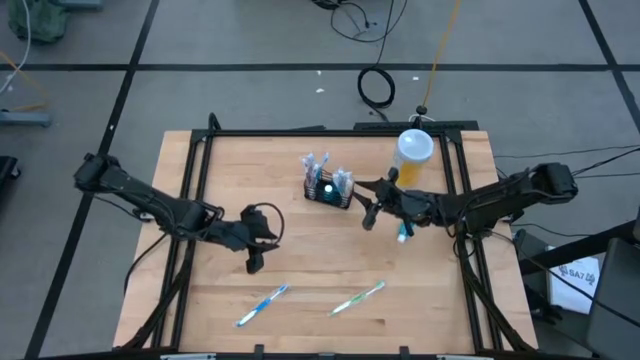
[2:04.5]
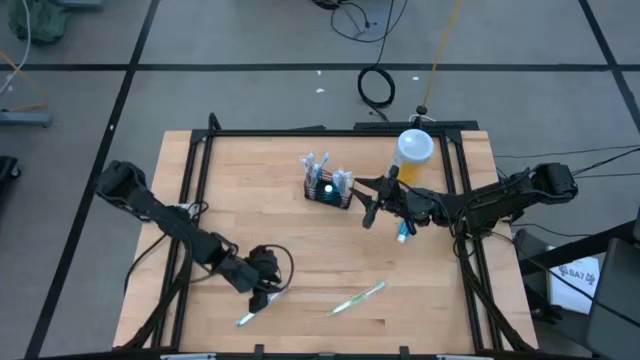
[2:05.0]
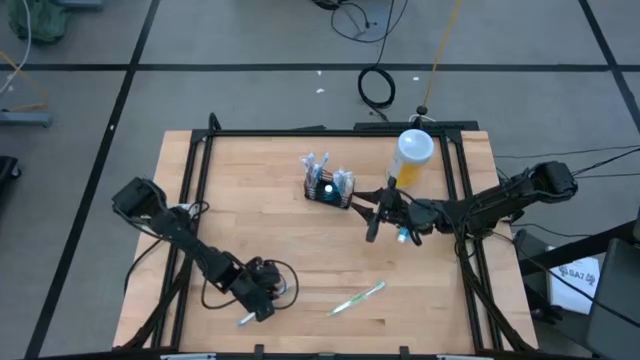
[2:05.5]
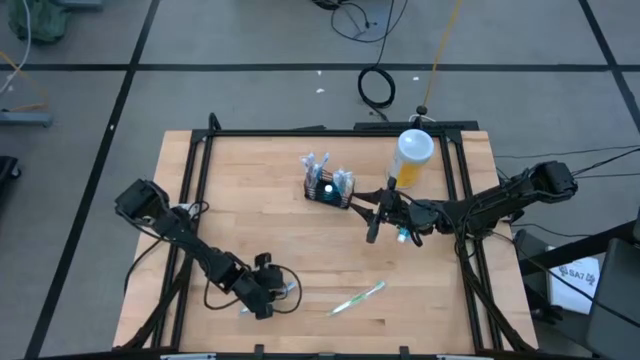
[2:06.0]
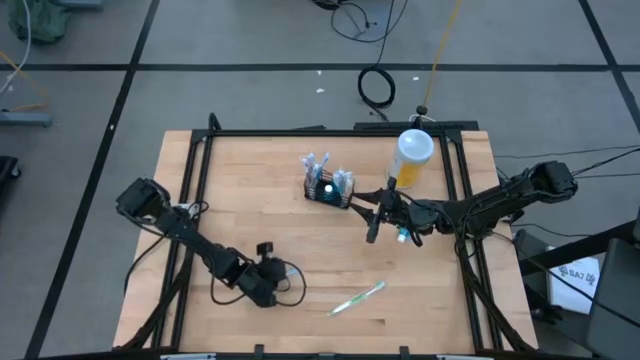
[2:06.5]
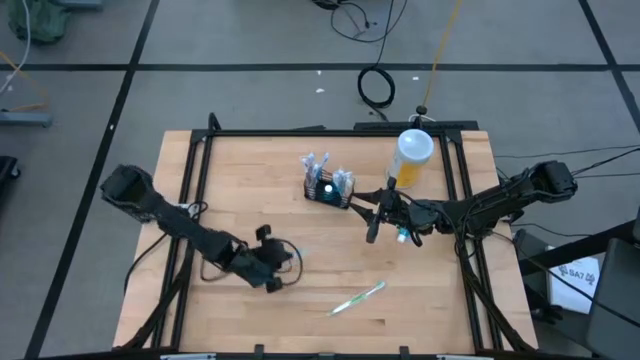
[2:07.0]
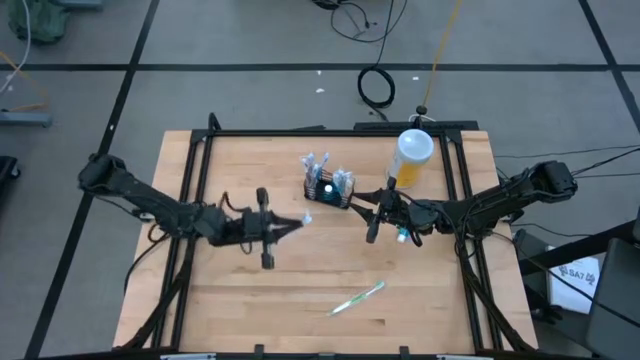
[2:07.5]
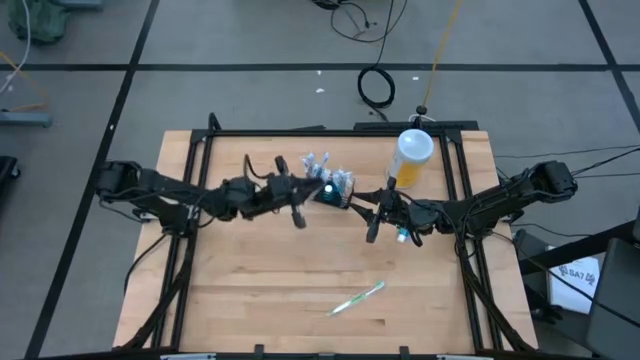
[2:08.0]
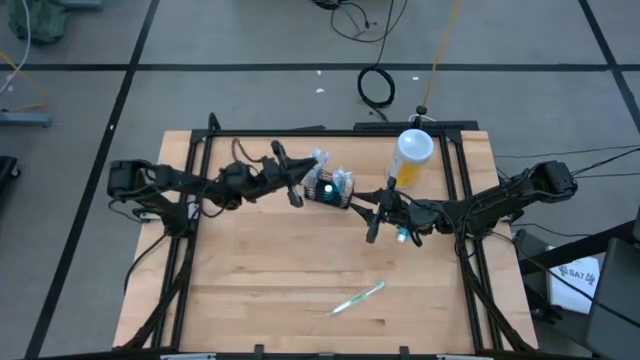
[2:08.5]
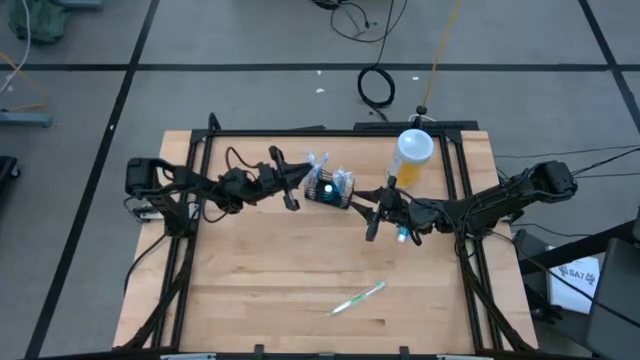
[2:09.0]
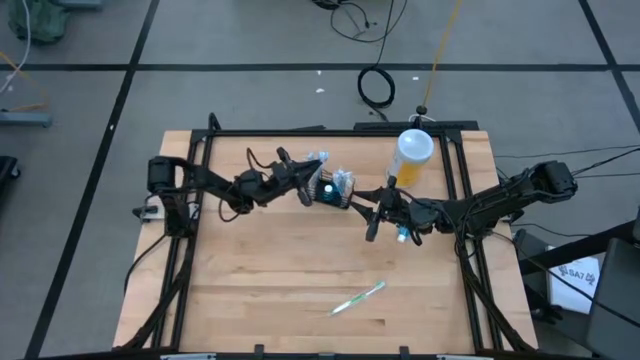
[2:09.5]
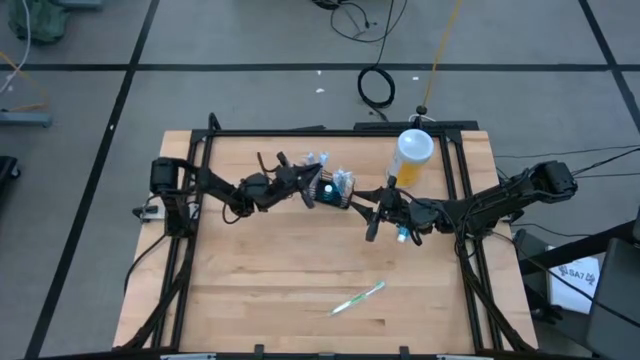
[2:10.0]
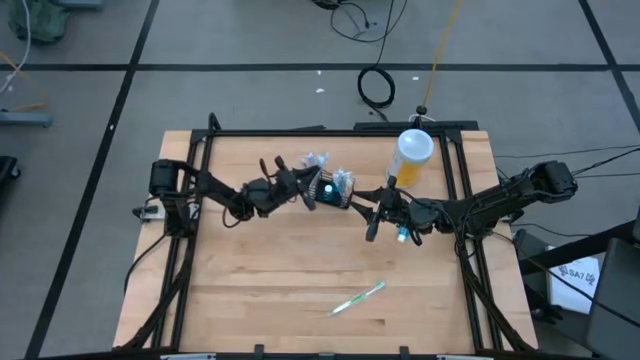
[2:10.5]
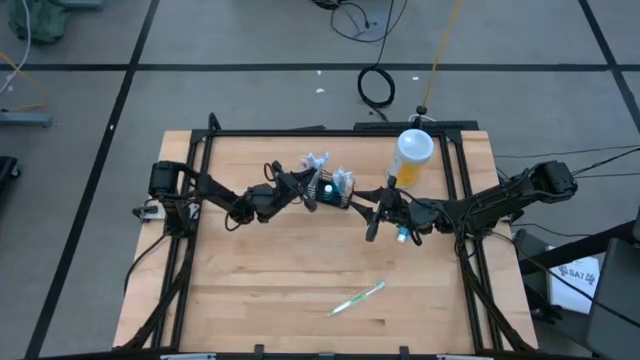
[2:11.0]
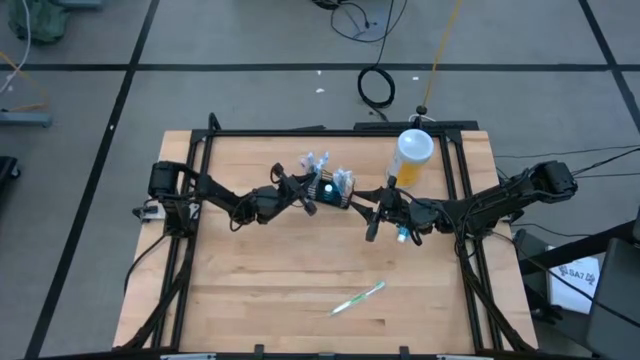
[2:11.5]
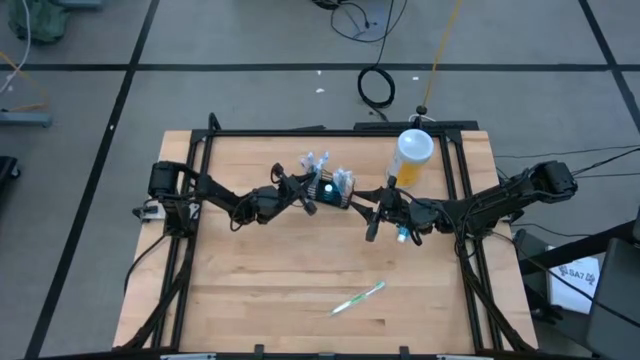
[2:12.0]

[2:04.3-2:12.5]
Task: Pick & Place toothbrushing station
Put the blue toothbrush into the black wire organizer

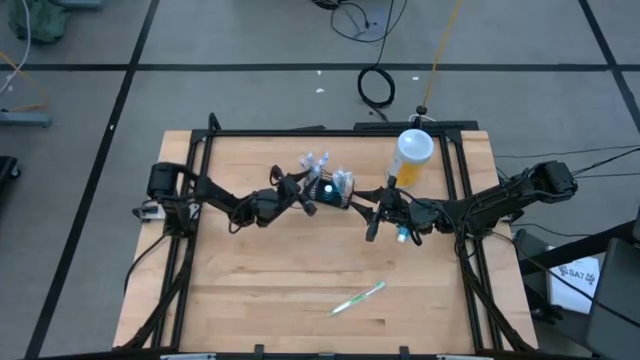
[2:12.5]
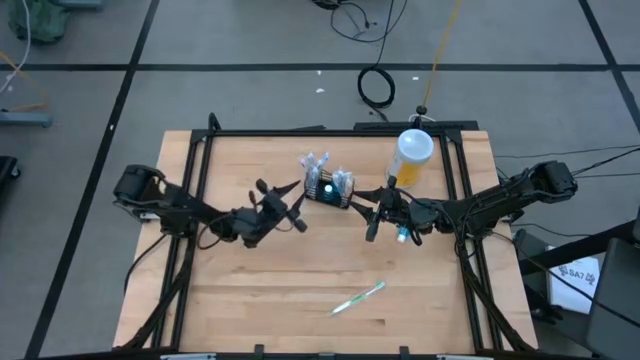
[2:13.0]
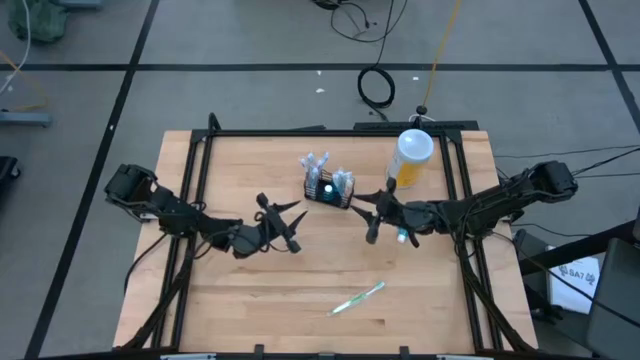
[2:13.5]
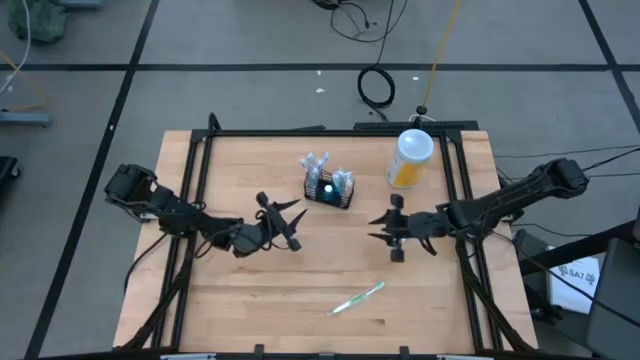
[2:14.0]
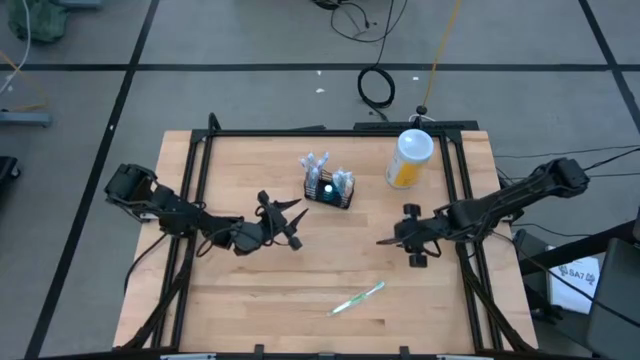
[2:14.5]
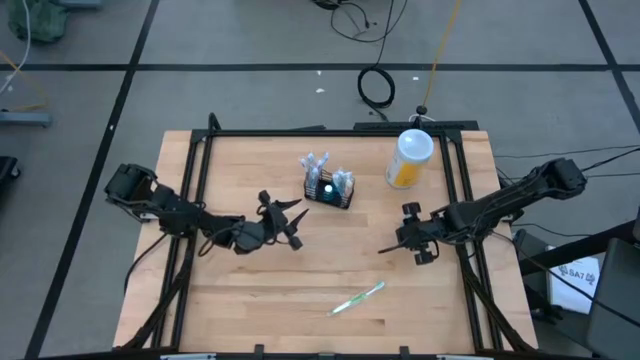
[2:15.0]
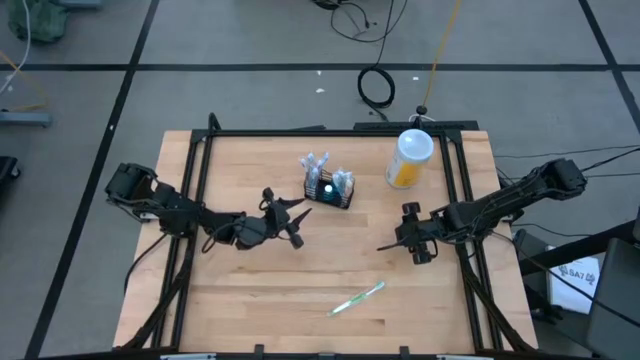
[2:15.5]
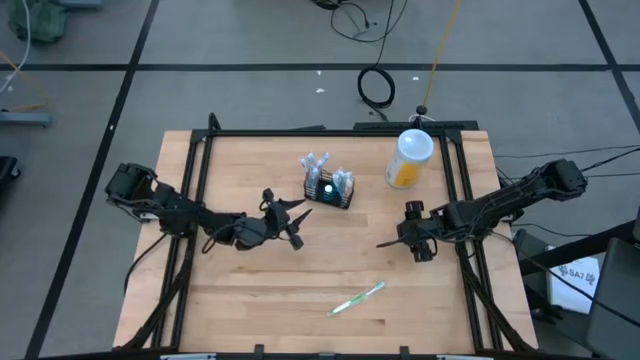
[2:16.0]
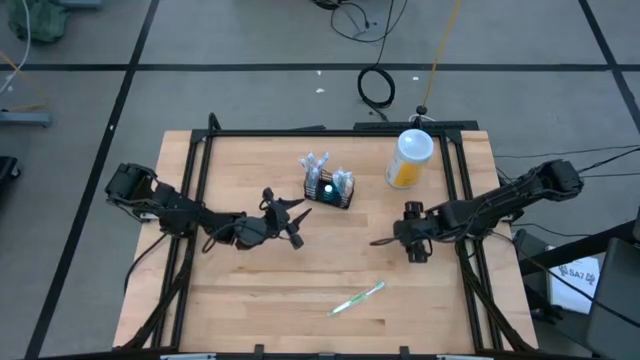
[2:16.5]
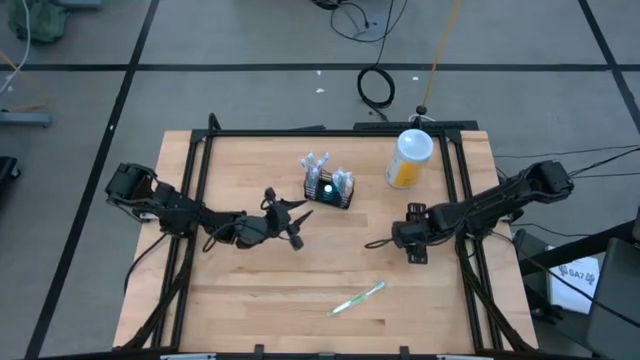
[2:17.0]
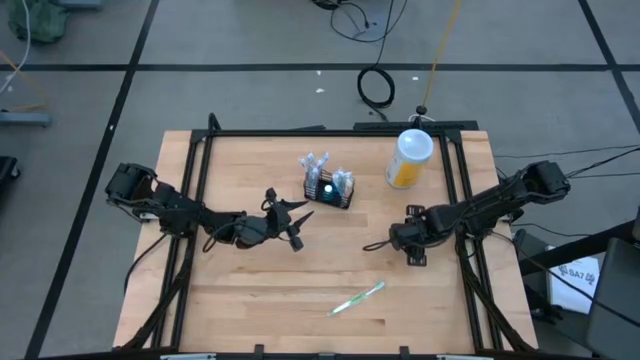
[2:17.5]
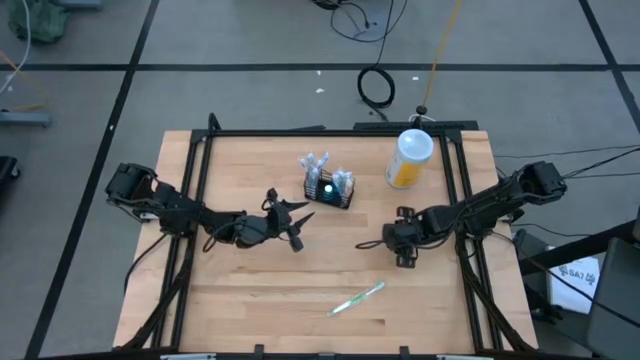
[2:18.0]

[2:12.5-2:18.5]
Put the blue mouthwash into the black wire organizer

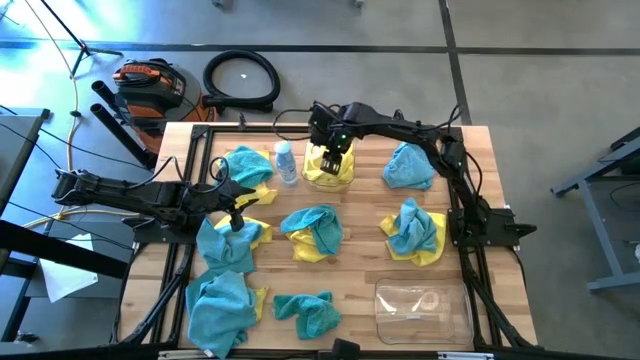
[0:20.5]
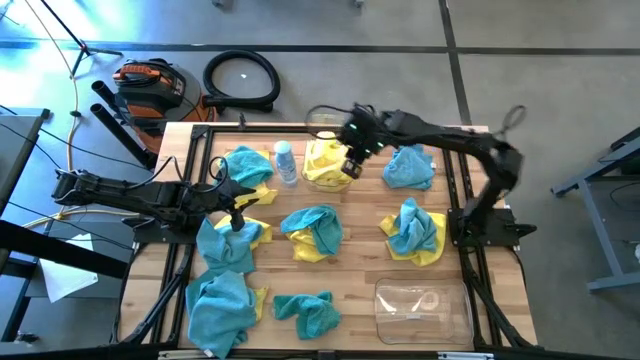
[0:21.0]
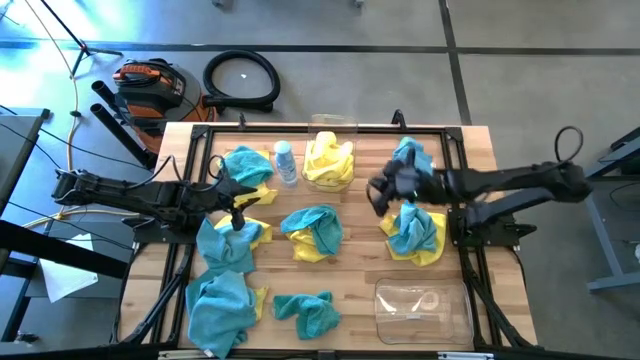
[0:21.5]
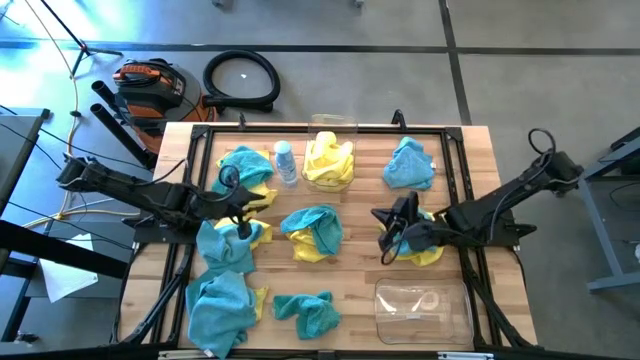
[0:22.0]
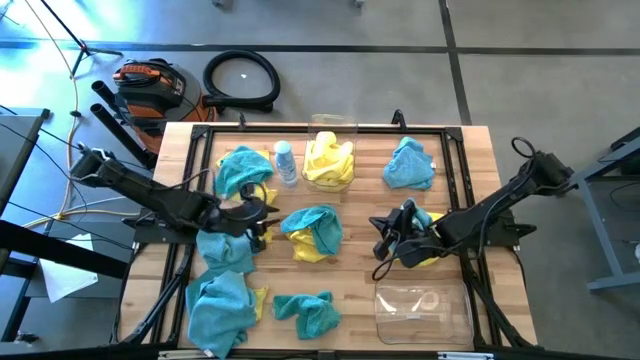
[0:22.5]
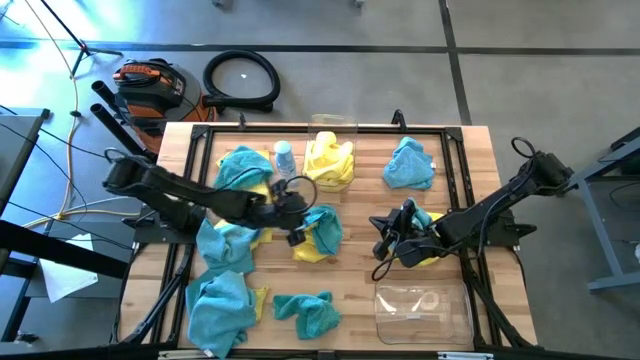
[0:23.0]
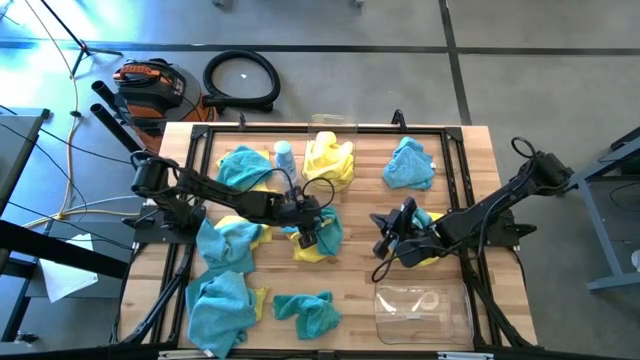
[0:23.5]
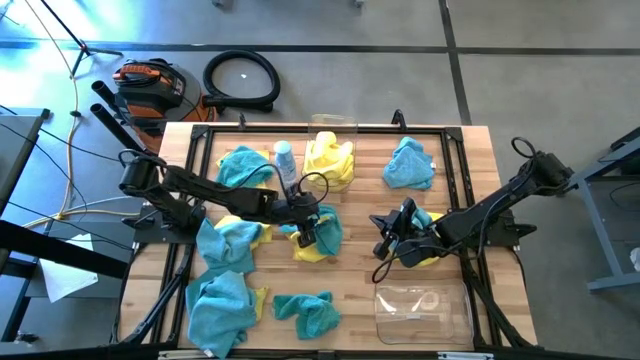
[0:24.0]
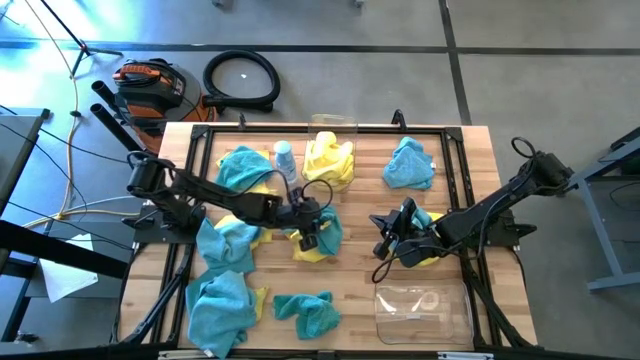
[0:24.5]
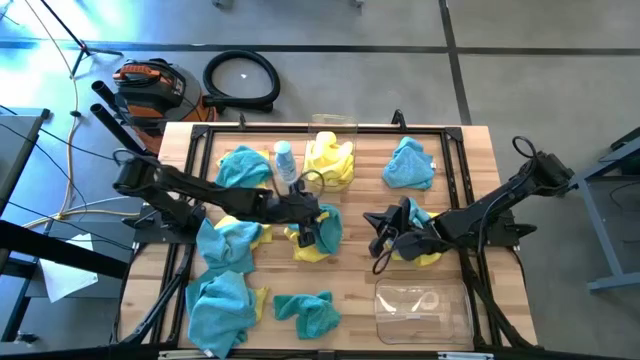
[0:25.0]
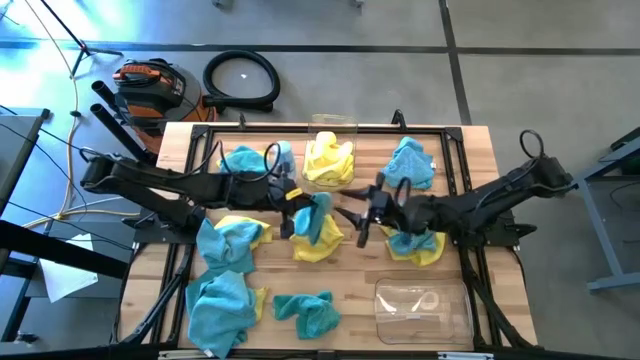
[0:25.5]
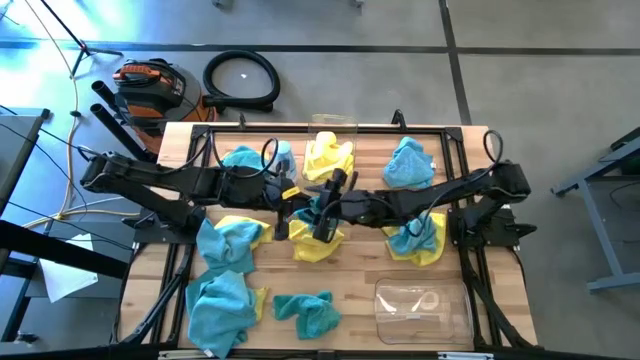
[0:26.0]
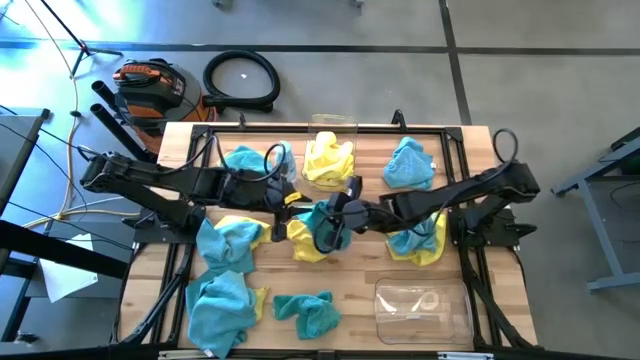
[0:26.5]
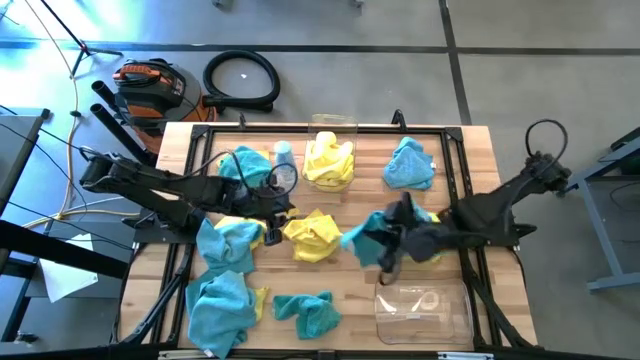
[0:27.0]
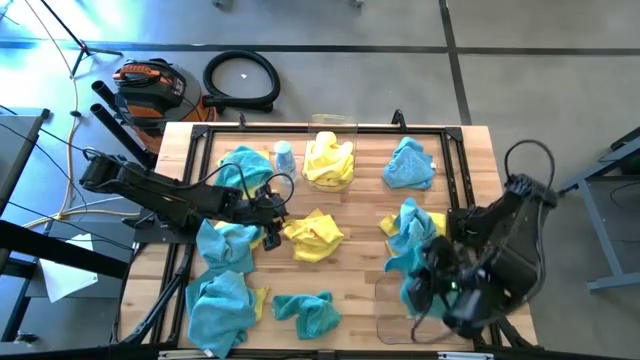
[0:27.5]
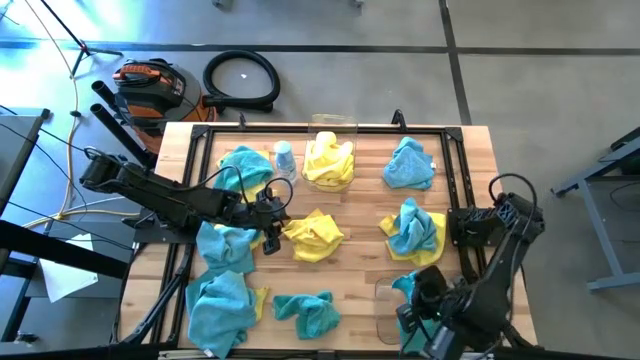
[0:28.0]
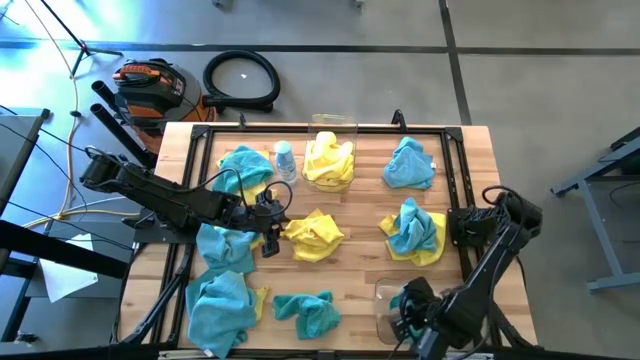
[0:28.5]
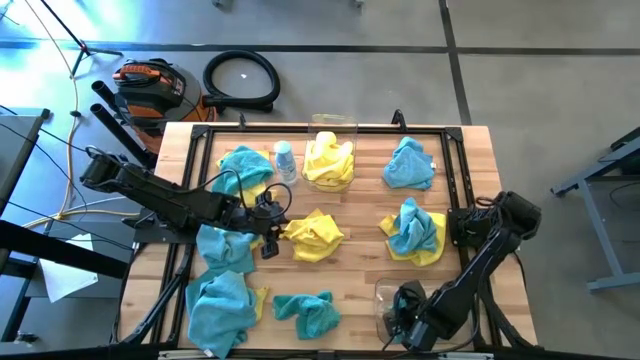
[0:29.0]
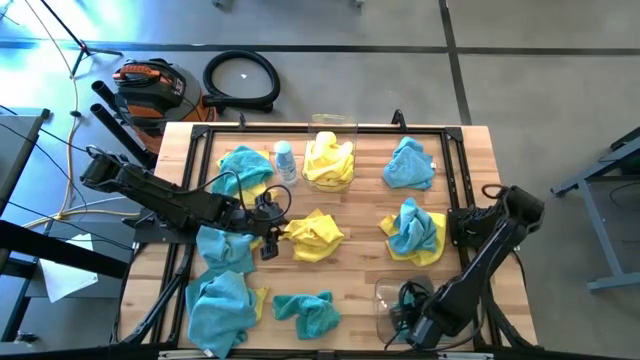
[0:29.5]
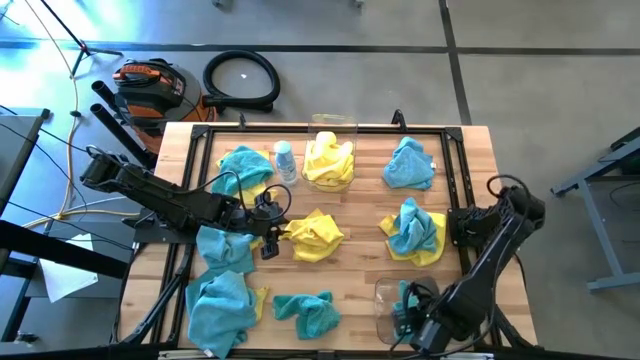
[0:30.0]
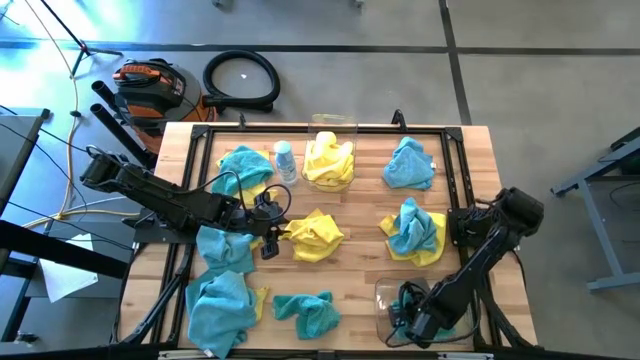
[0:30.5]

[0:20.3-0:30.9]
Task: Sort microfiber towel by color & place in baskets
Put the blue towel into the bottom transparent bin
